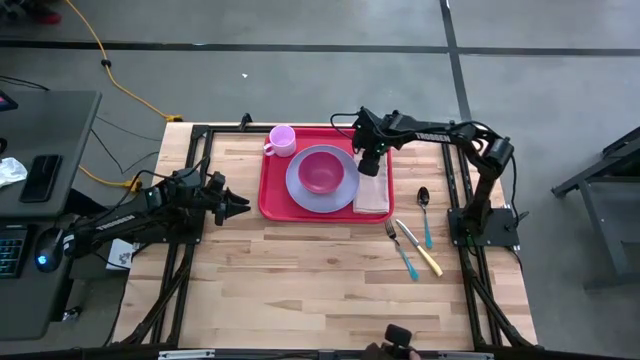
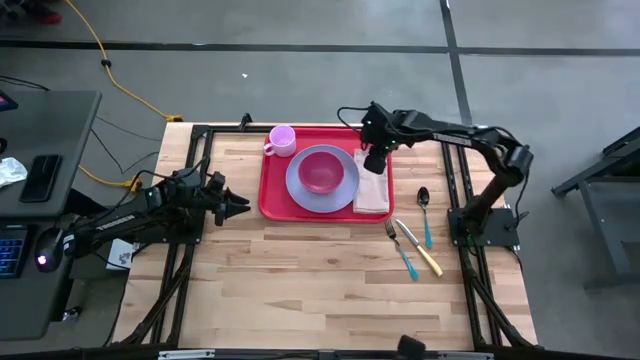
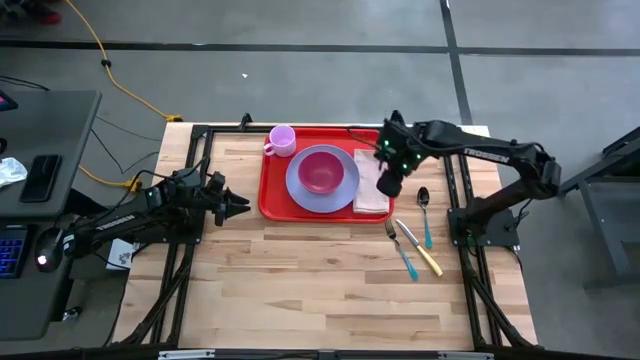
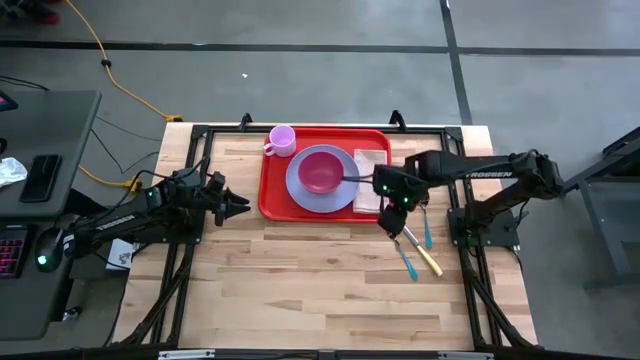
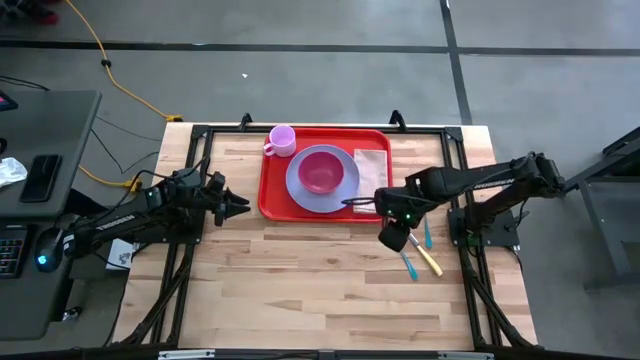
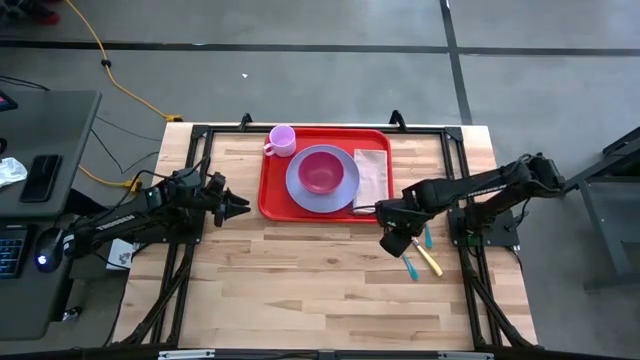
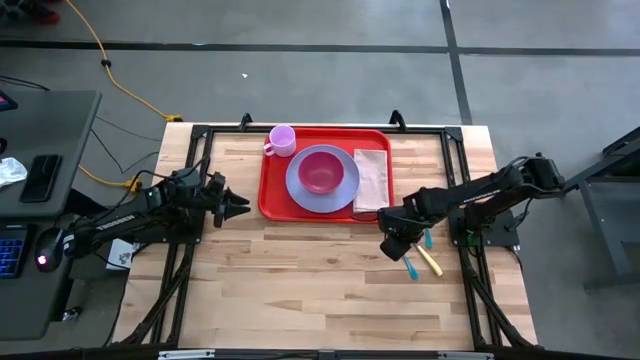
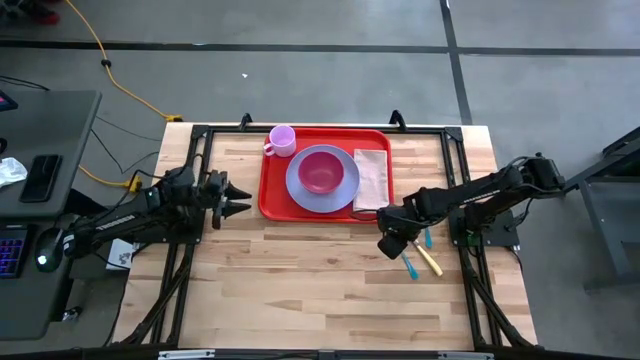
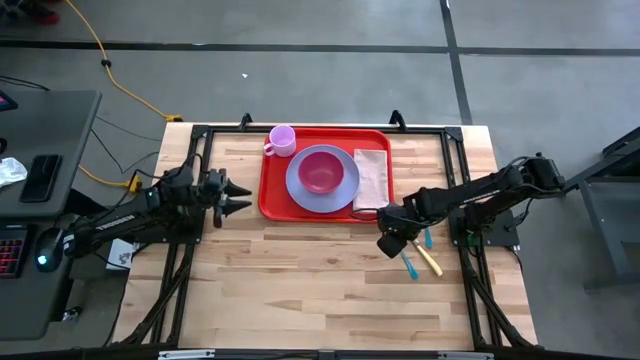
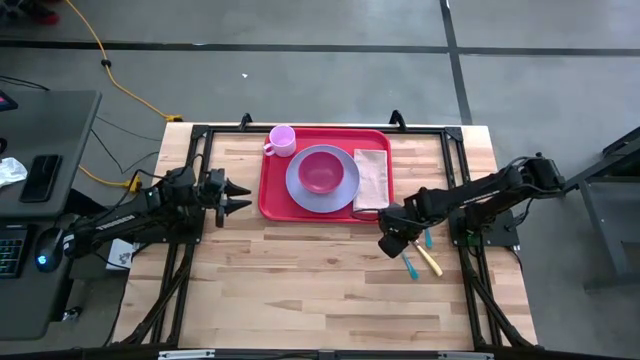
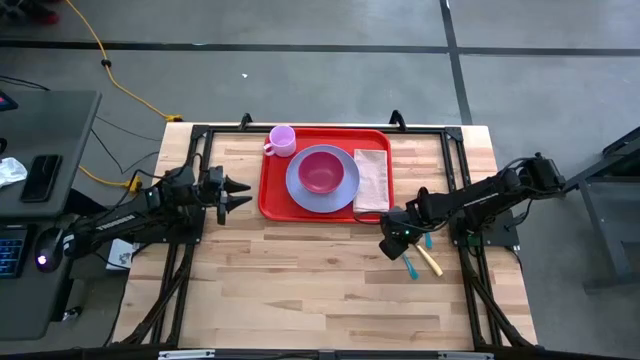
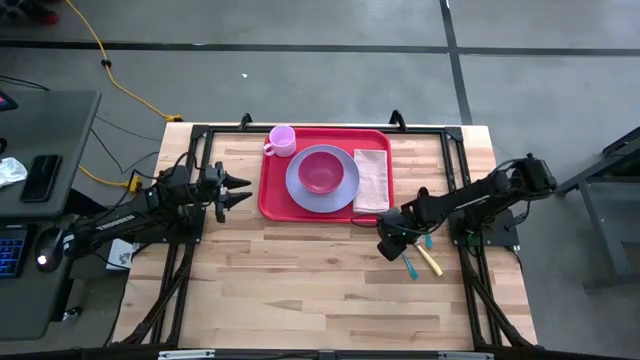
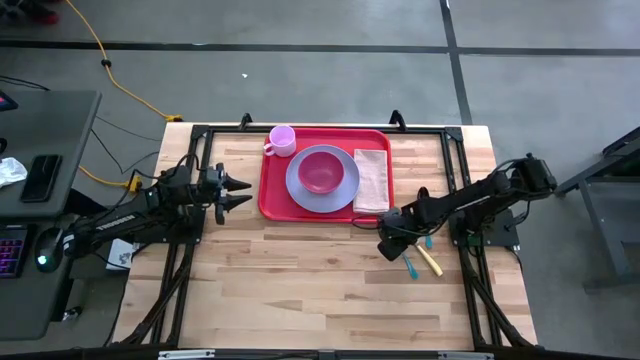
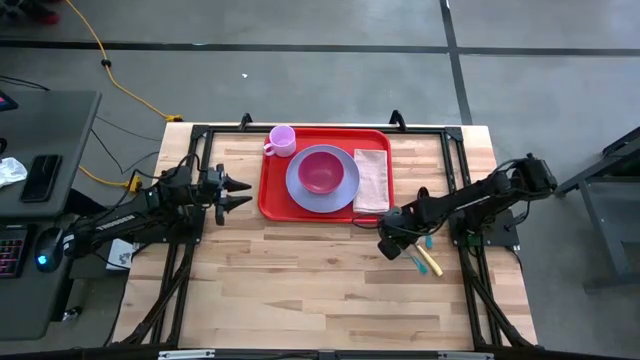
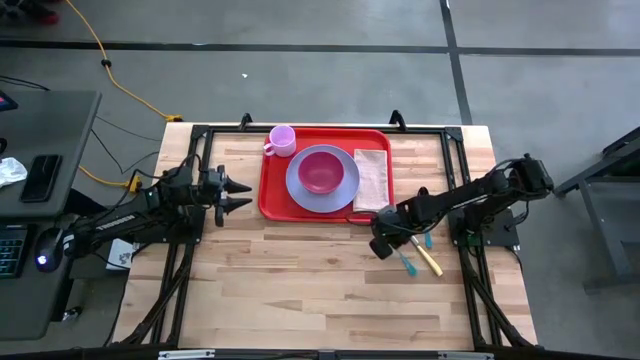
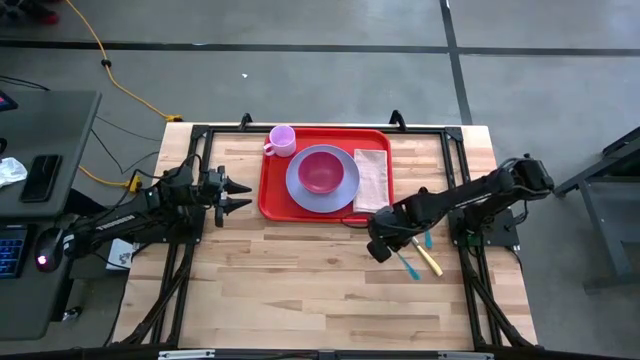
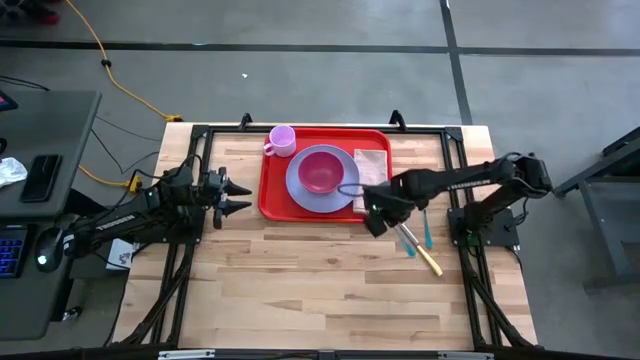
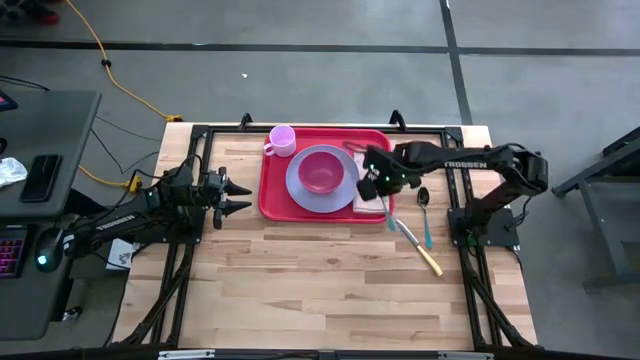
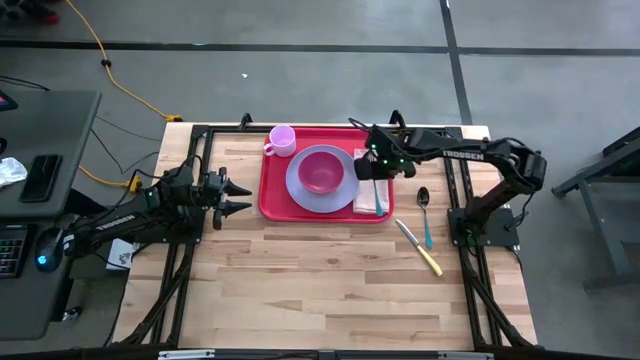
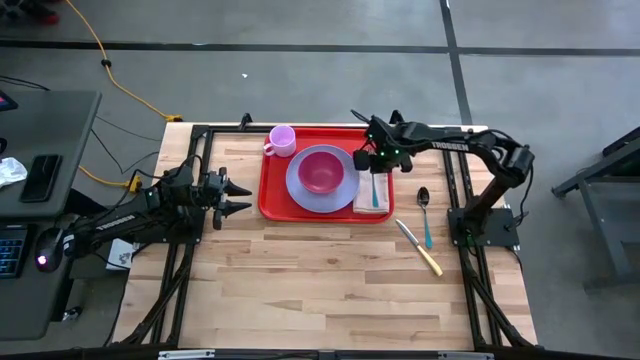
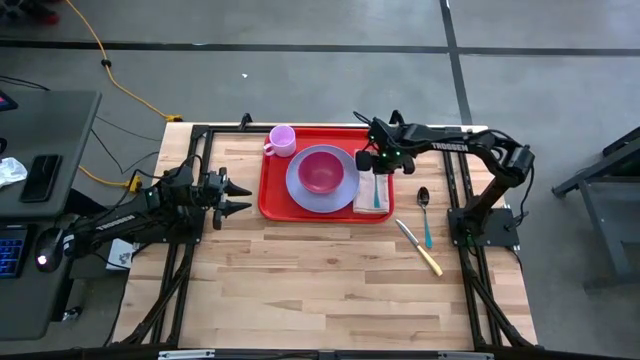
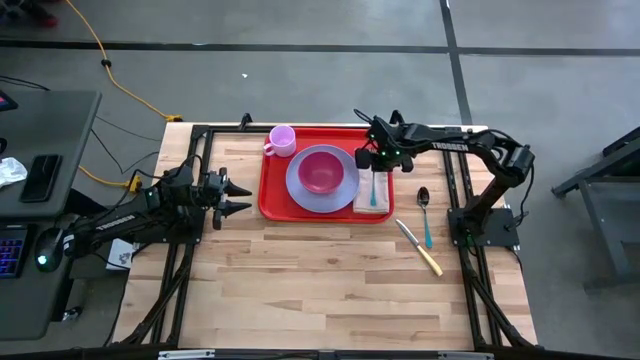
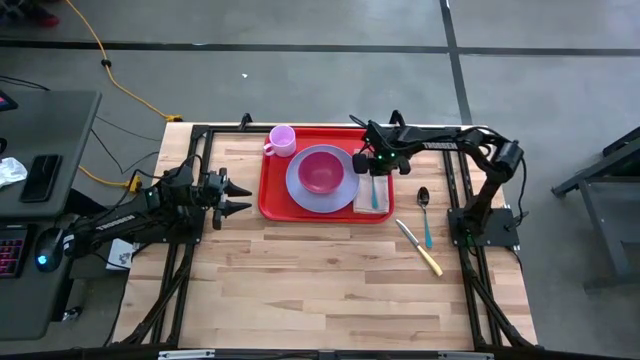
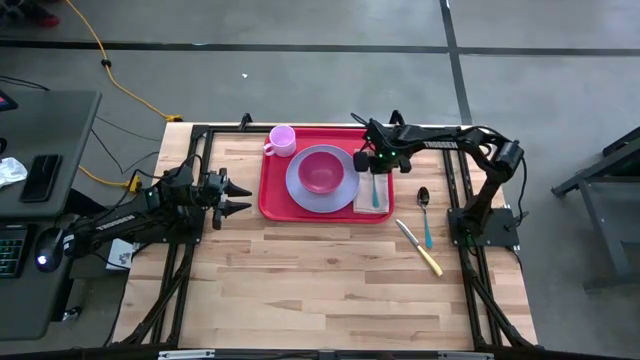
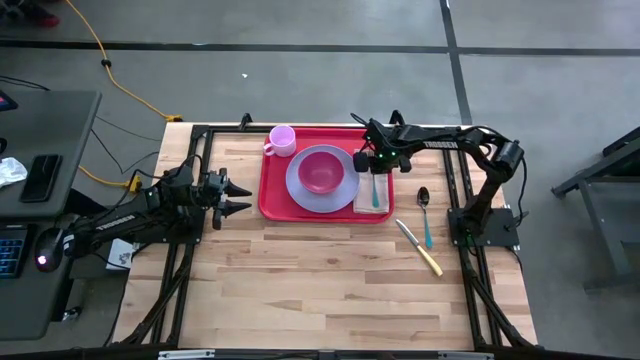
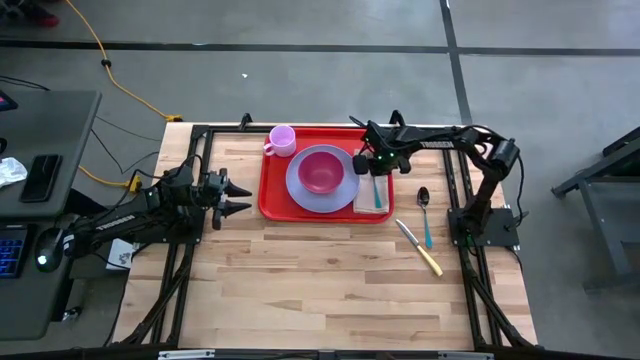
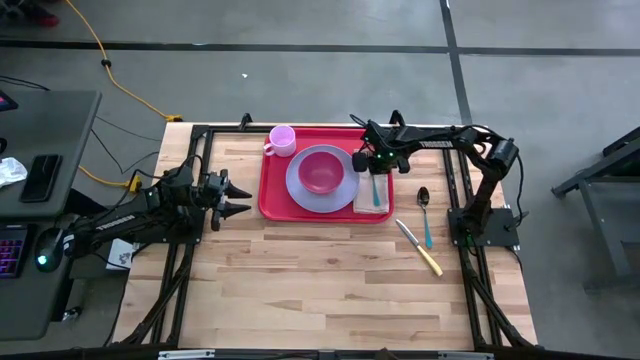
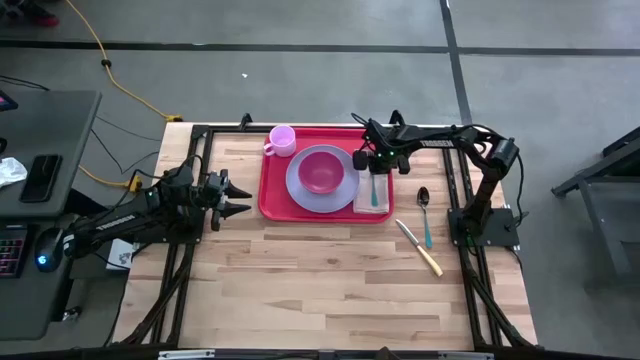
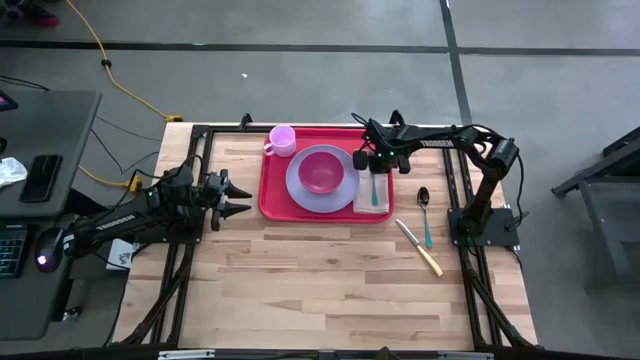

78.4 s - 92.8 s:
Task: Set up tray
Put the fork on the napkin on the tray

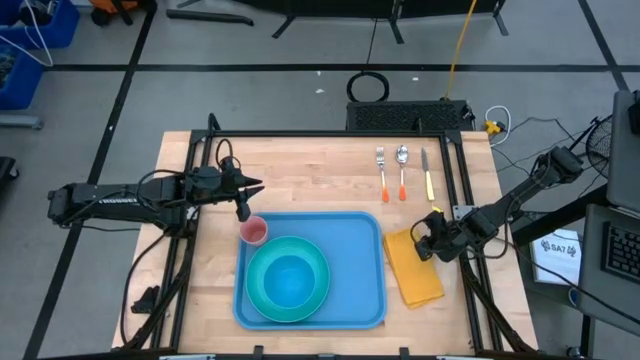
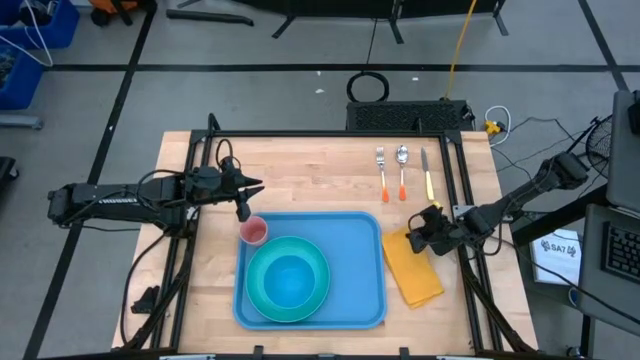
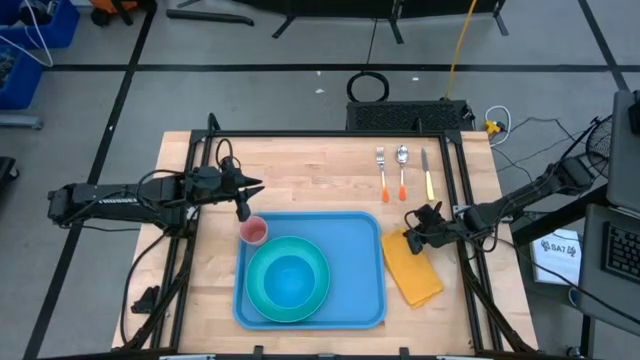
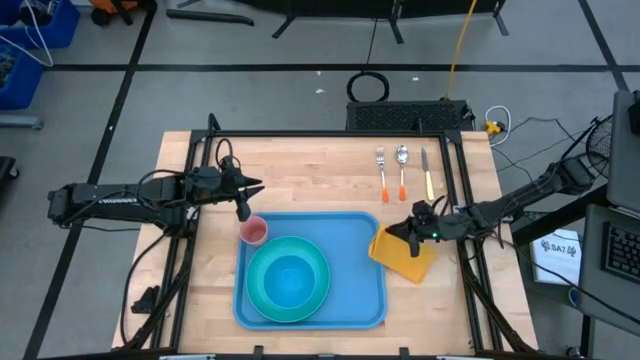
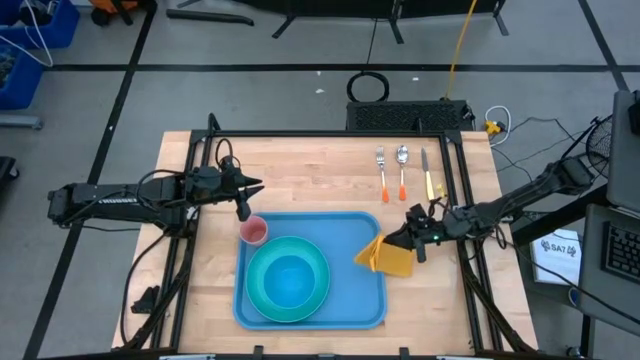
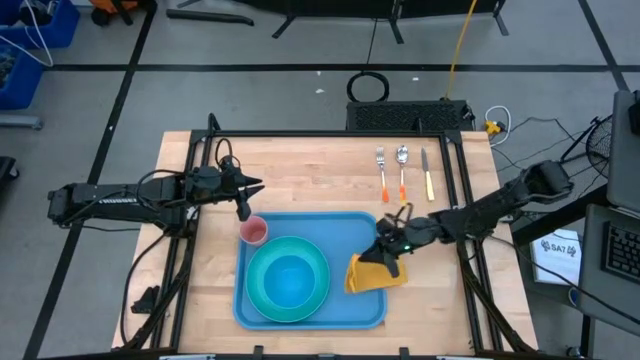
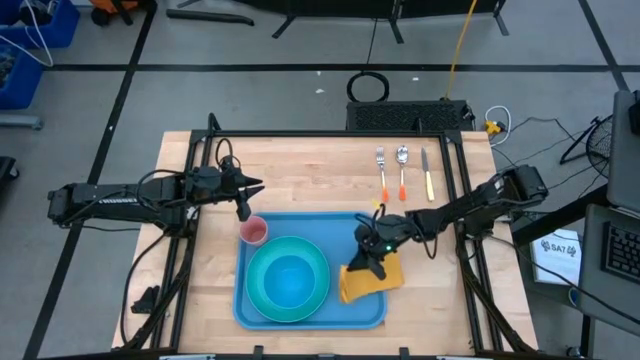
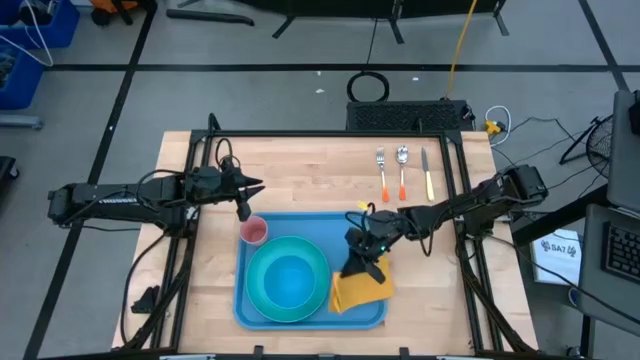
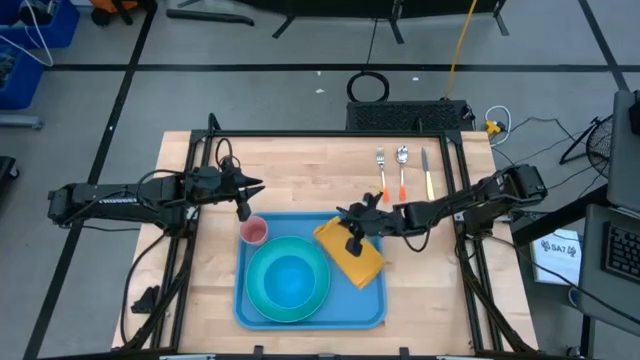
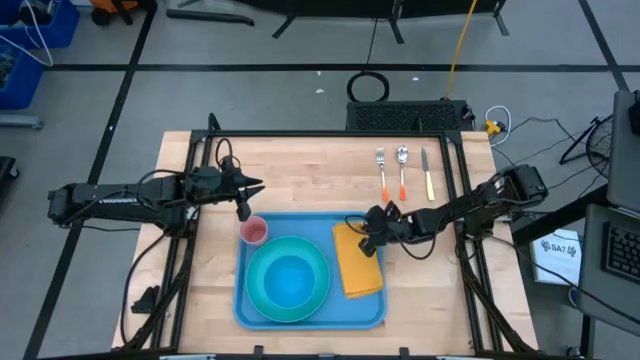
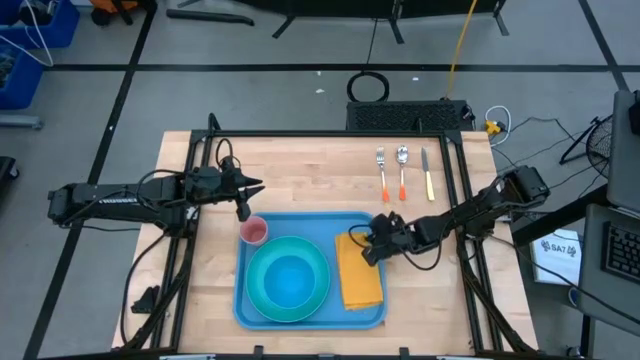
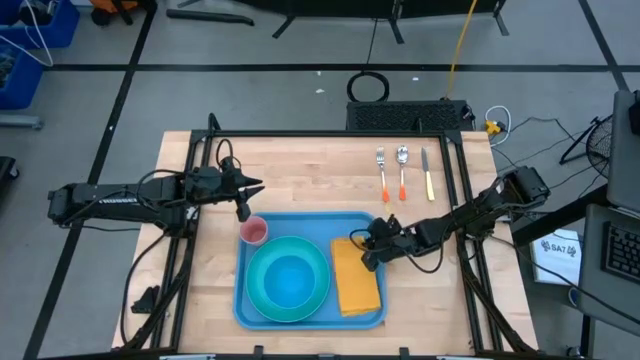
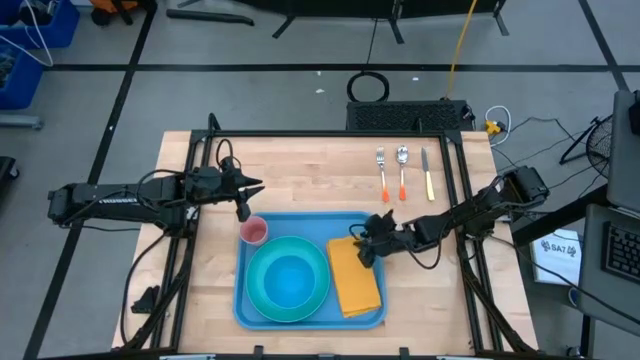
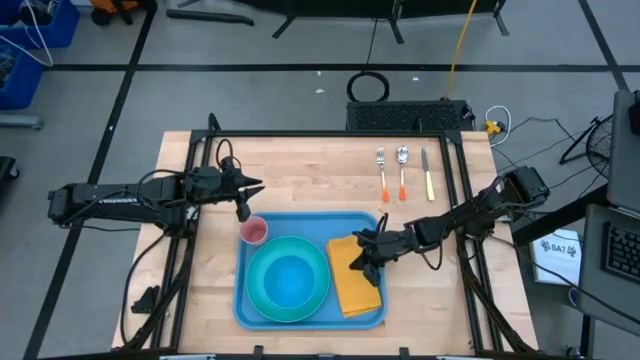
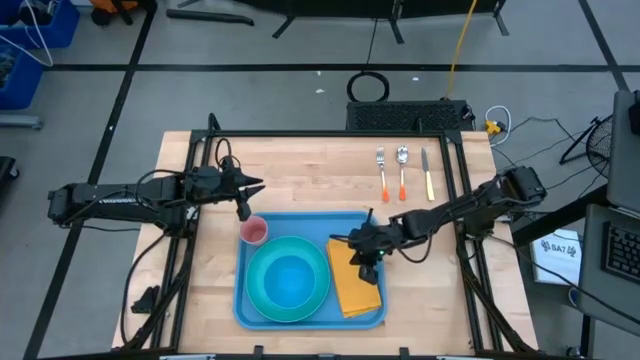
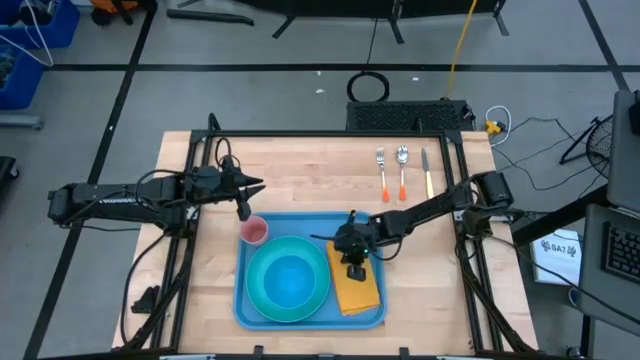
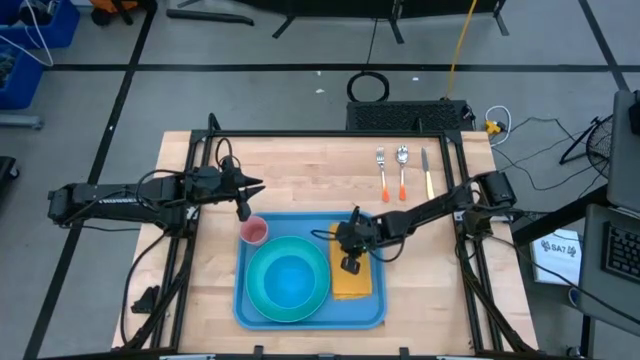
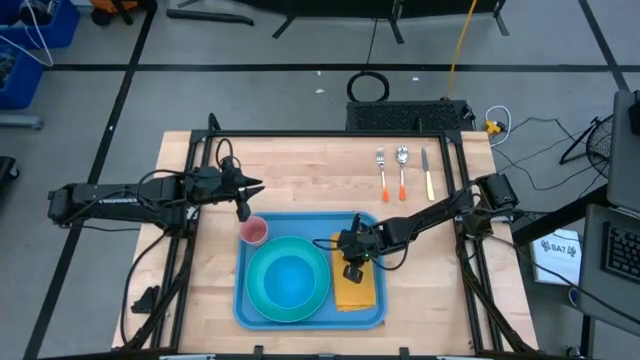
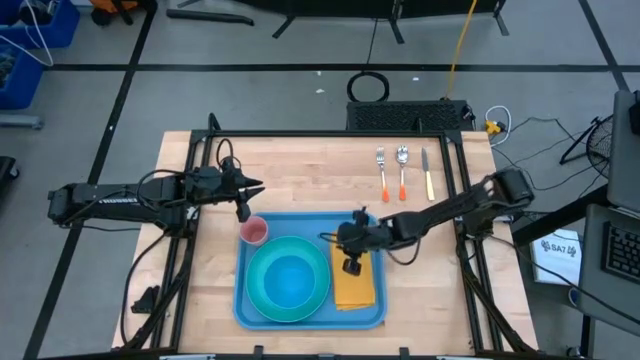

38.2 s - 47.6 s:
Task: Set up tray
Put the yellow napkin to the right of the blue plate on the blue serving tray
